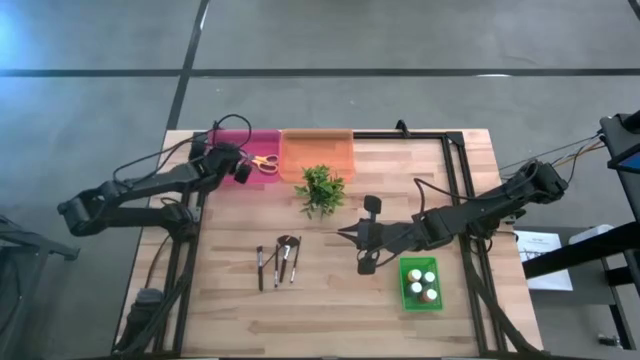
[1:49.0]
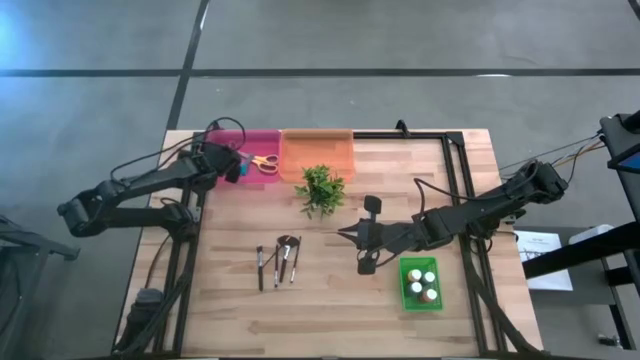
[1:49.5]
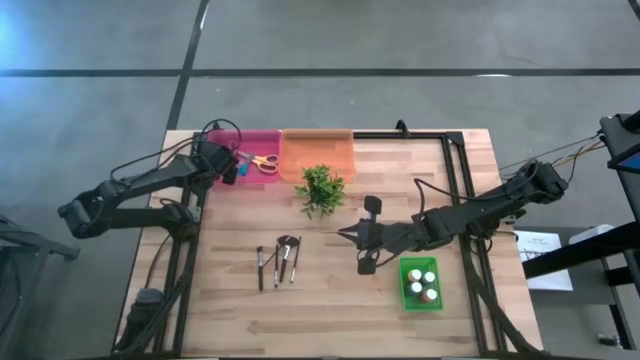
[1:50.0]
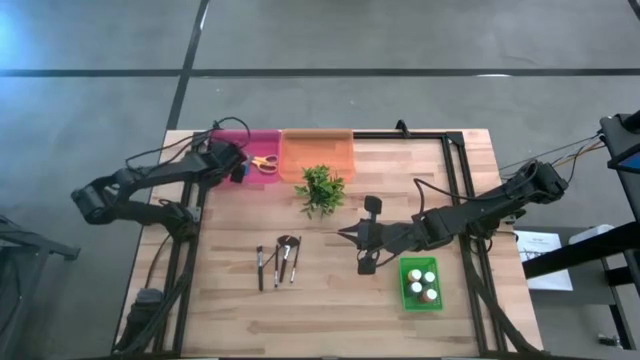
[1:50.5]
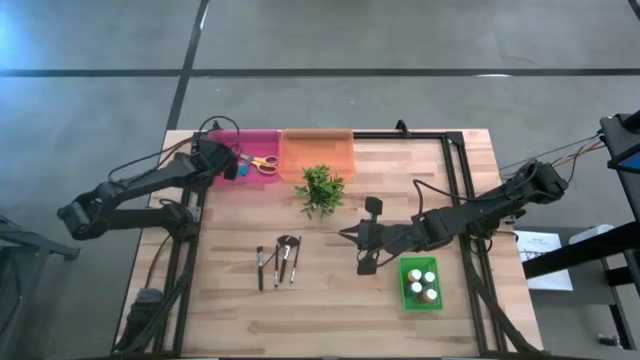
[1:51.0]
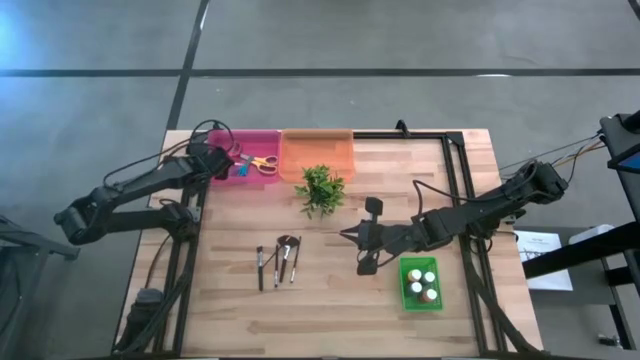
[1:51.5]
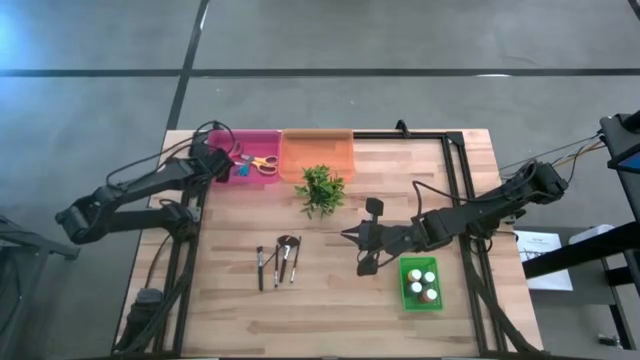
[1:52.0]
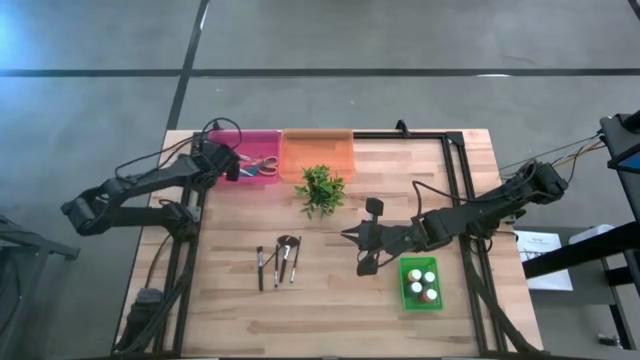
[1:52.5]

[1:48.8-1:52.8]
Task: Pick & Place Paint Supplies
Adjust the red scissors in the pink bin

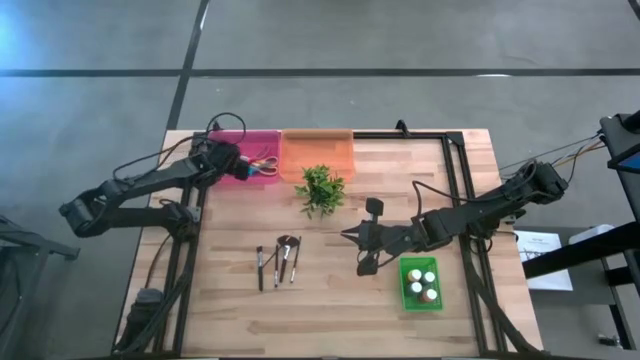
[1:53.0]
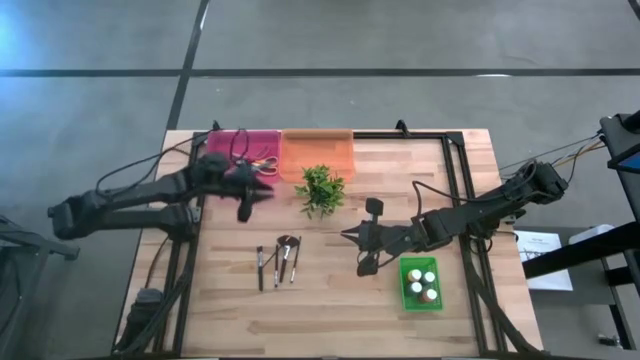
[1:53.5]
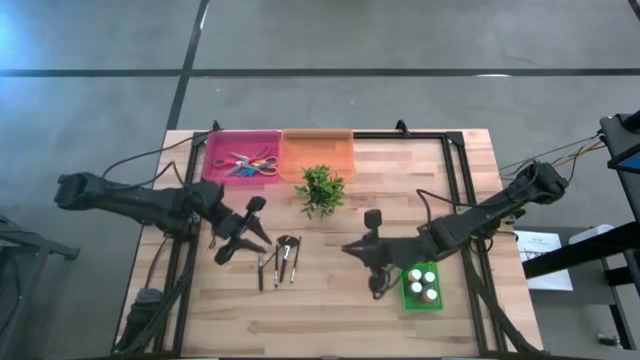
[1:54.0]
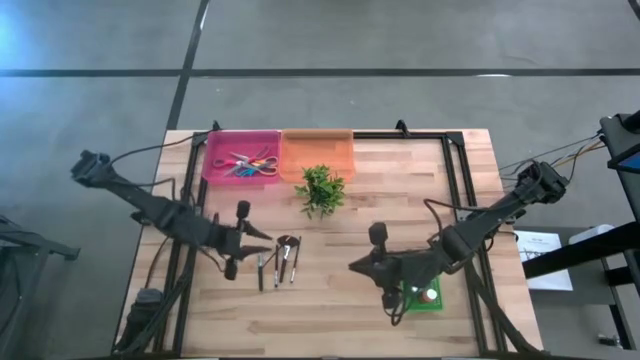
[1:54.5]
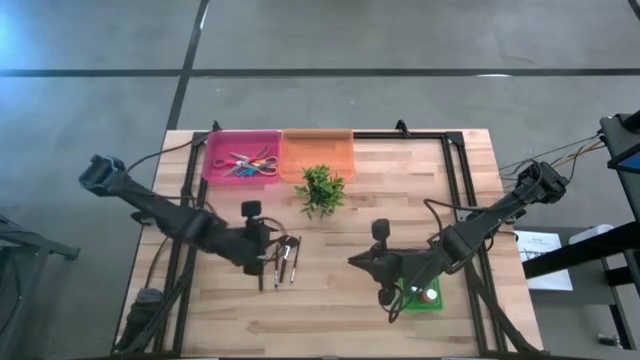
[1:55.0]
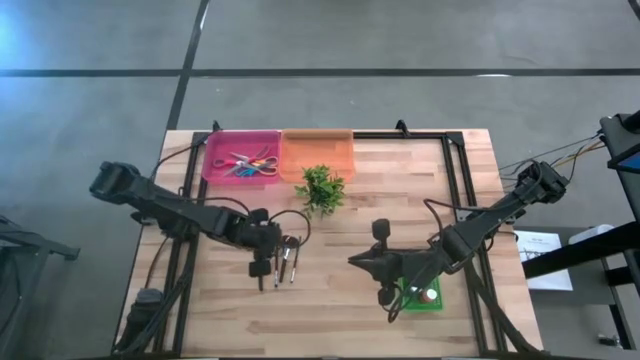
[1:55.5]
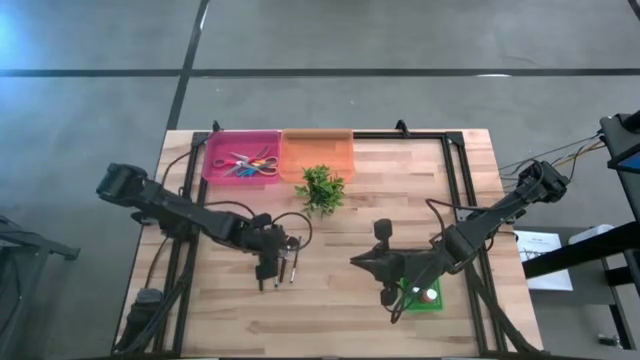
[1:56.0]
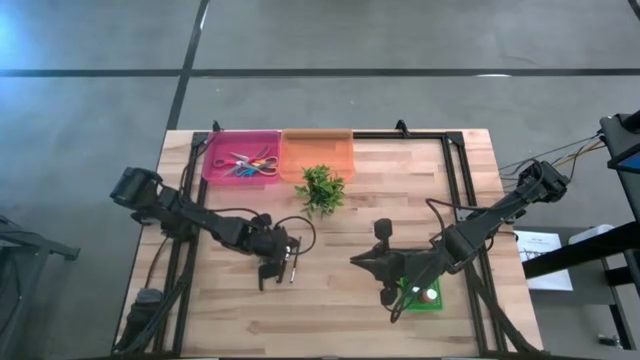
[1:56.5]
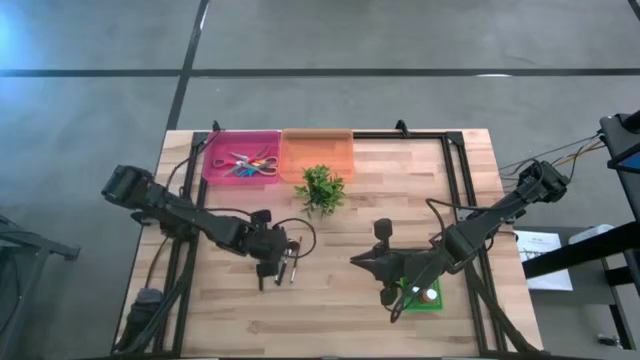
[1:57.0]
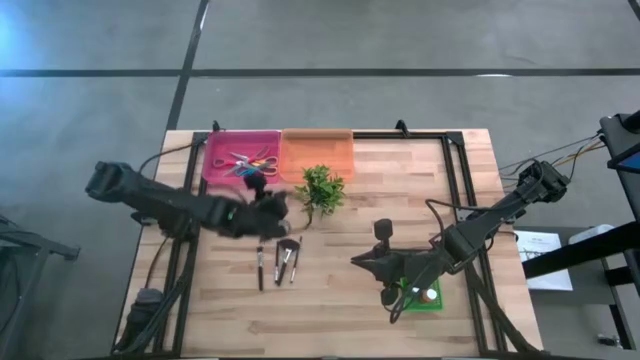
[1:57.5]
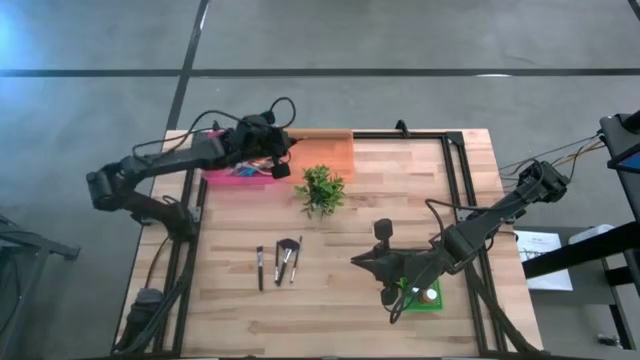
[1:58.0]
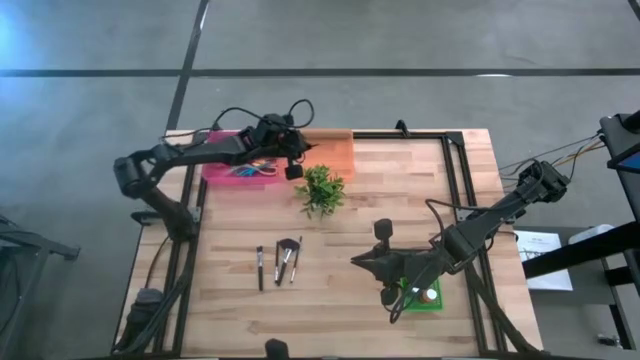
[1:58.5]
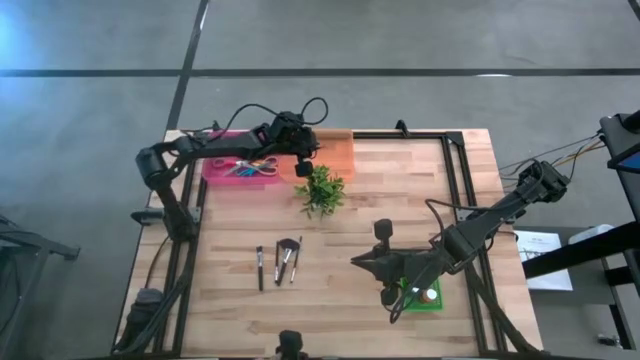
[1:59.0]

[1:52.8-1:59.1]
Put the gold paintbrush into the orange bin

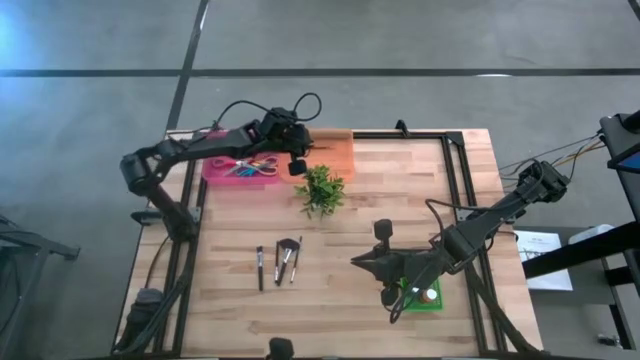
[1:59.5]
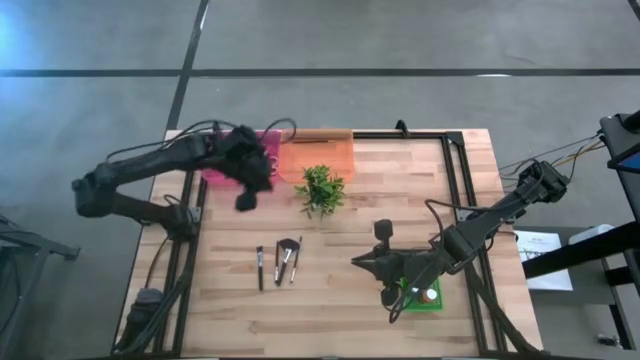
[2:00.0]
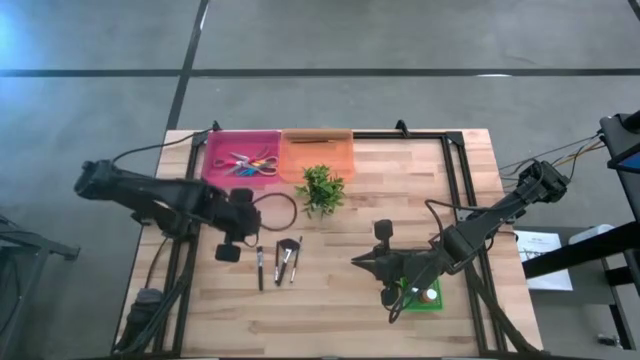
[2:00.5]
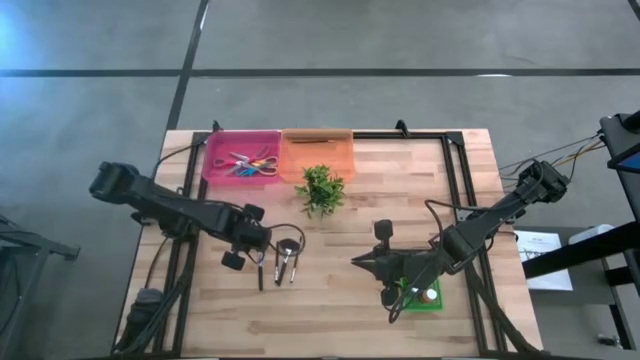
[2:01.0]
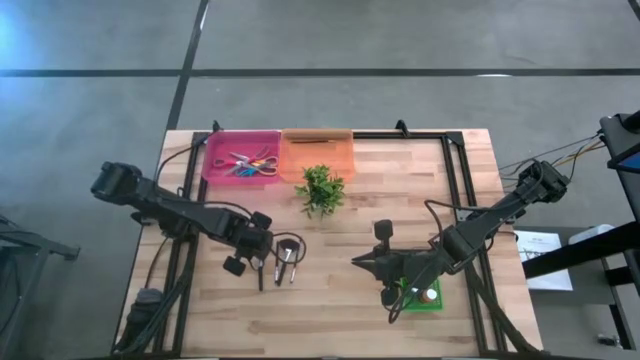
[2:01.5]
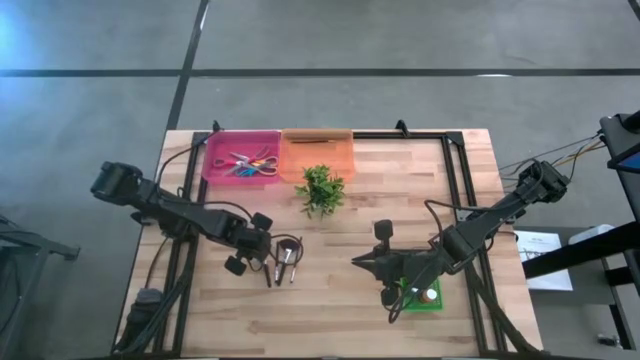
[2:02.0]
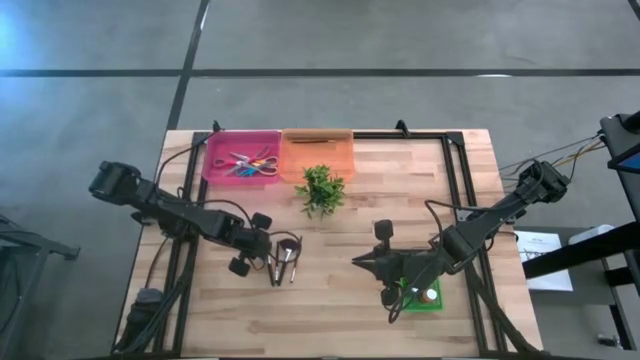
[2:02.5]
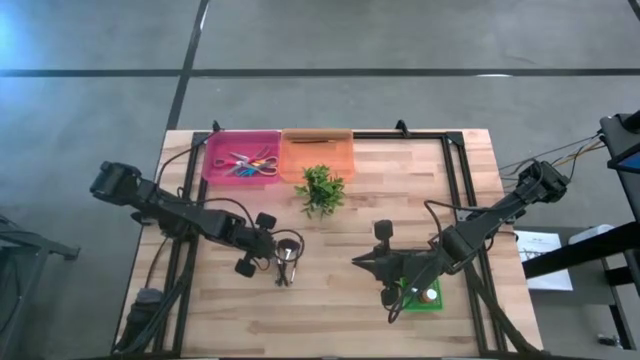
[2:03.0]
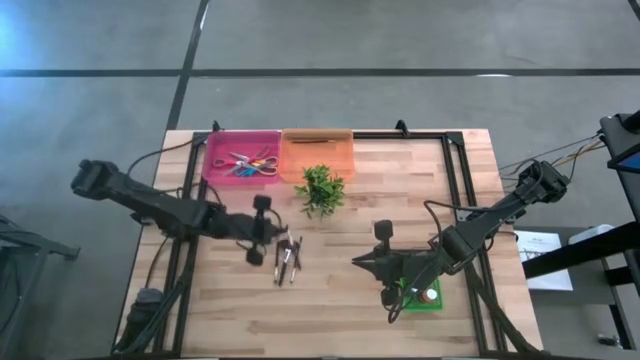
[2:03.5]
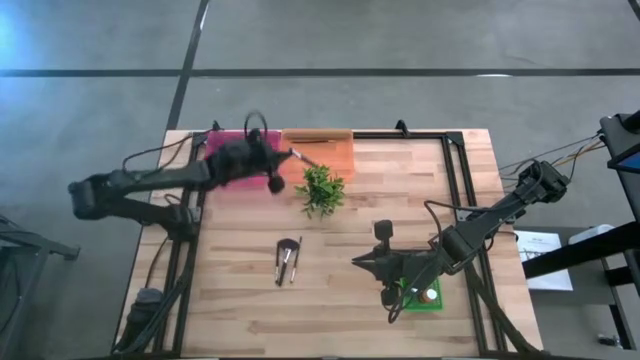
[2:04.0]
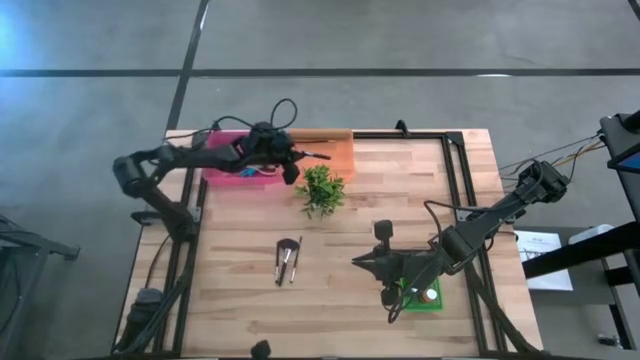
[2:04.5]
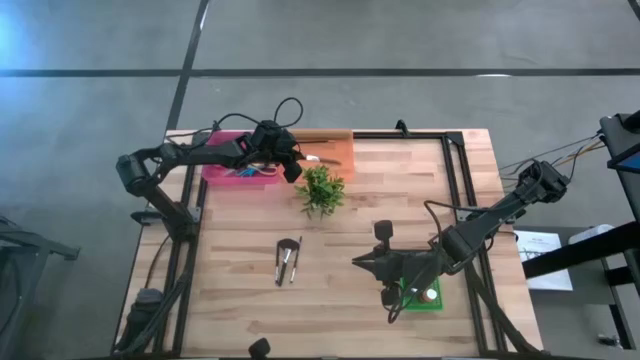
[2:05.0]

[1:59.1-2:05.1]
Put the silver foundation brush into the orange bin

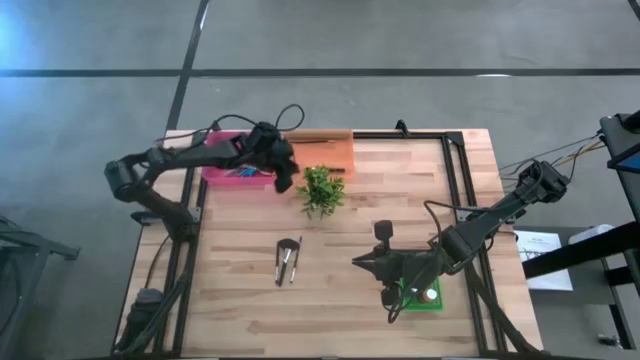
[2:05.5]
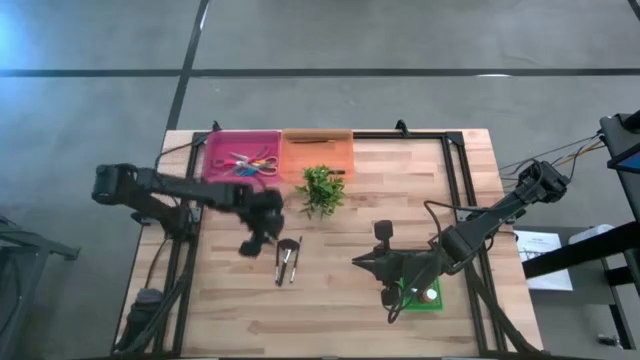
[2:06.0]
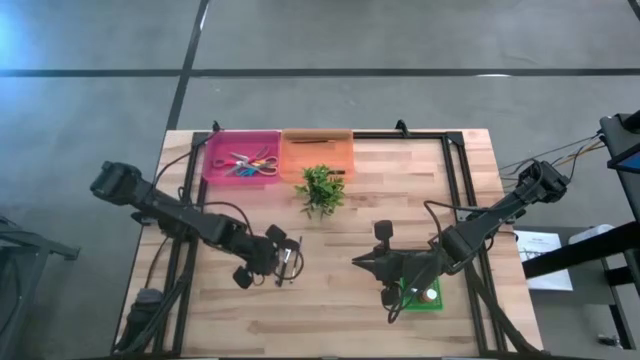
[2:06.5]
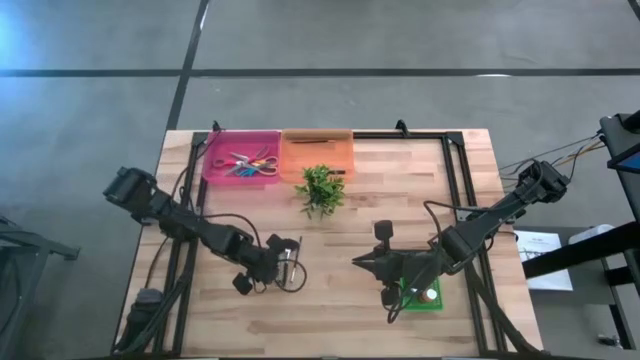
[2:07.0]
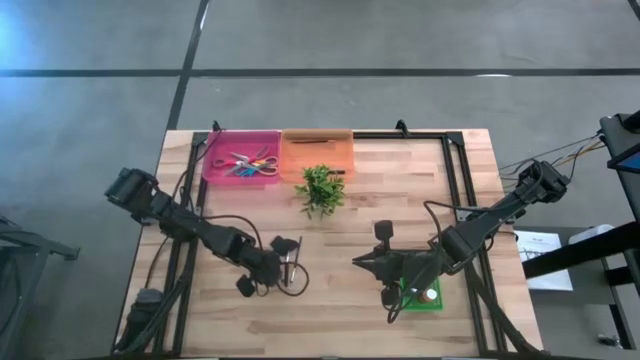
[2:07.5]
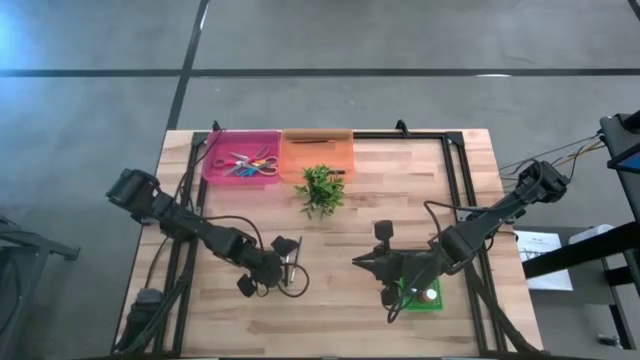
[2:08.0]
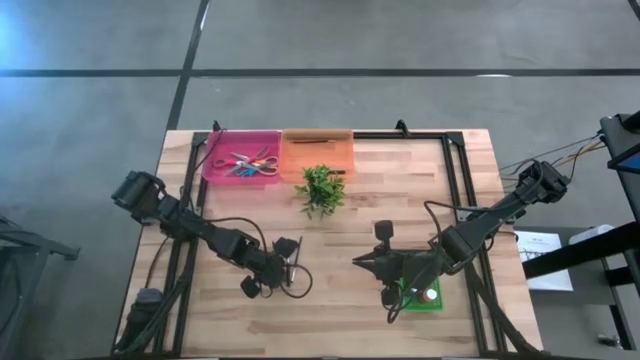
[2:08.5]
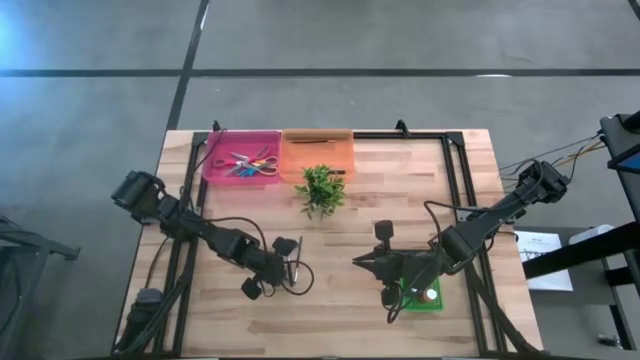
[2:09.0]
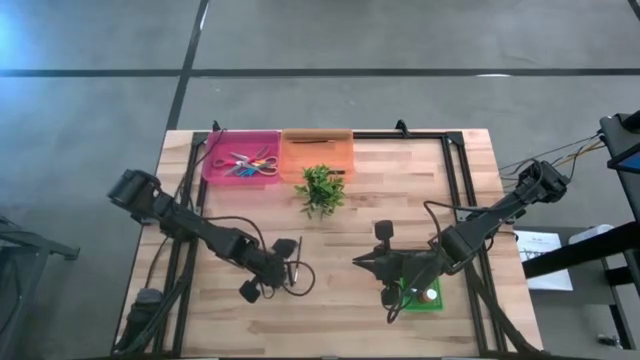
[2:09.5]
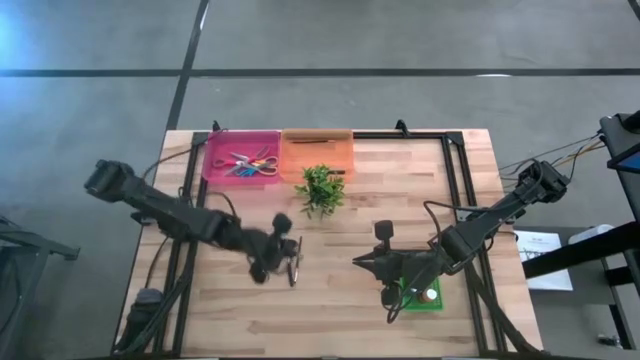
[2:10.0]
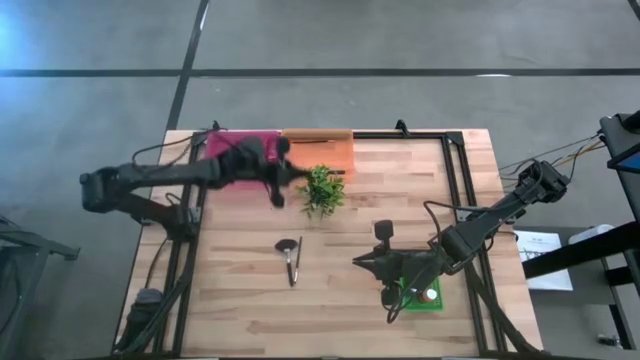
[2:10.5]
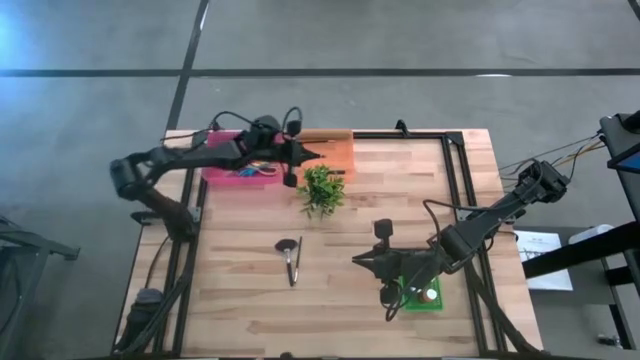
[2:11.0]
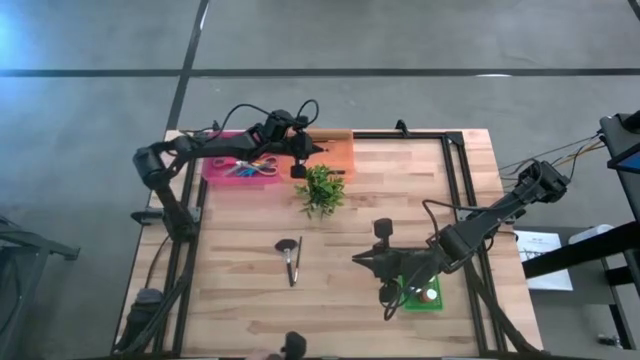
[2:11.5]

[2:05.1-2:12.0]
Put the left silver eyeshadow brush into the orange bin
